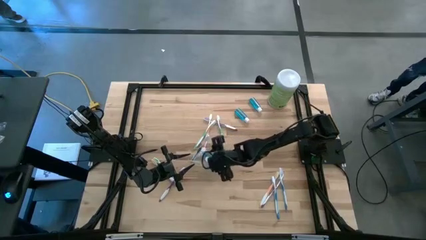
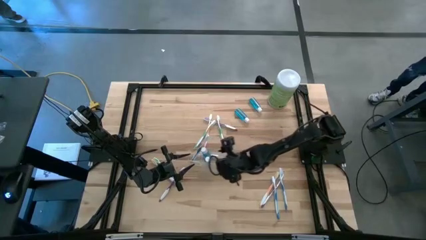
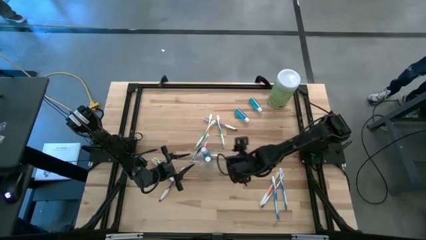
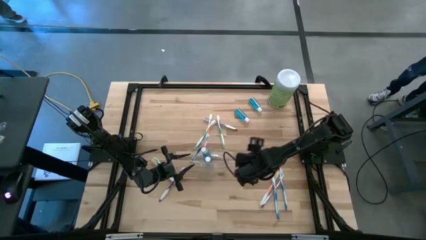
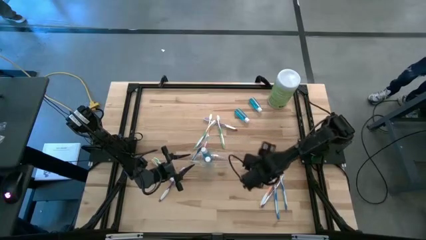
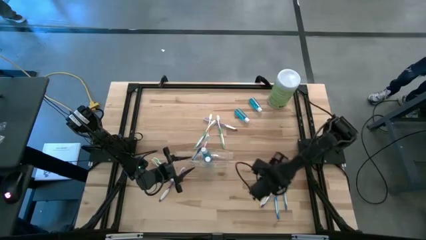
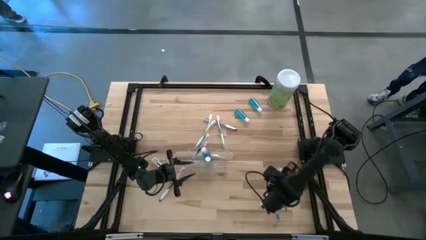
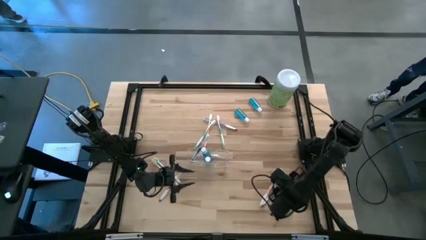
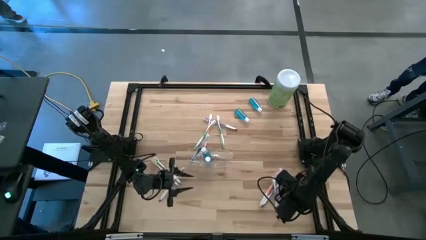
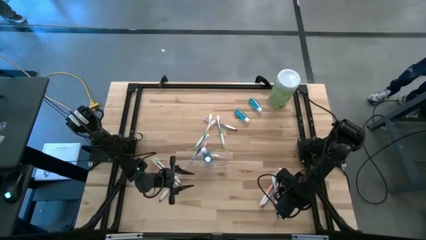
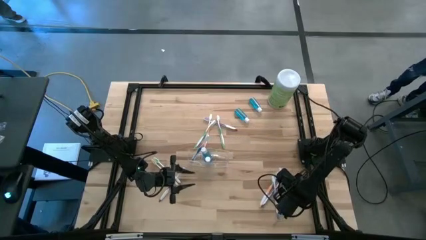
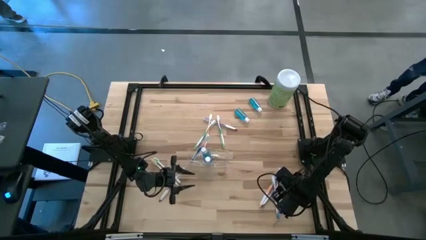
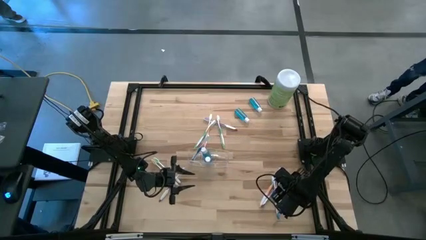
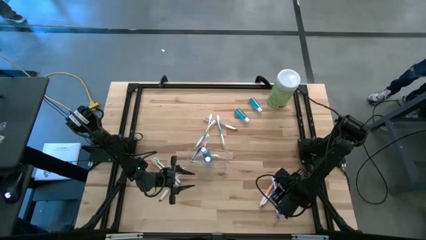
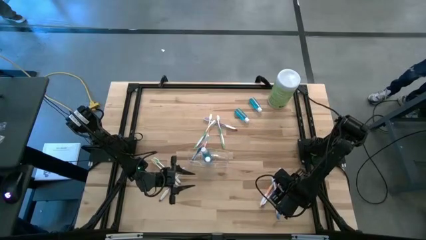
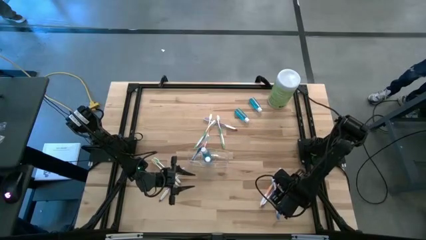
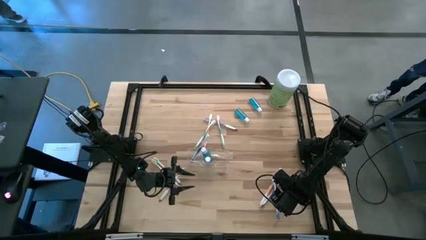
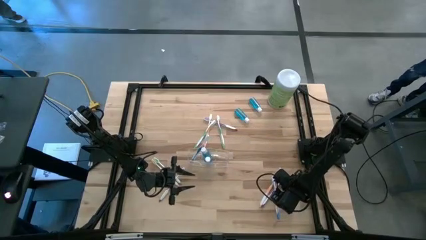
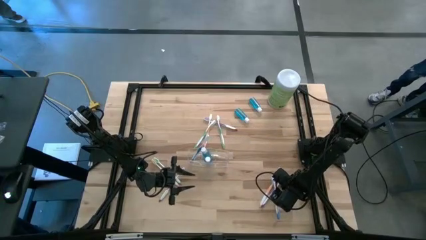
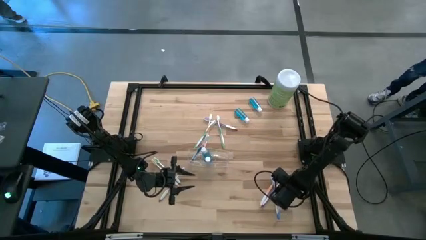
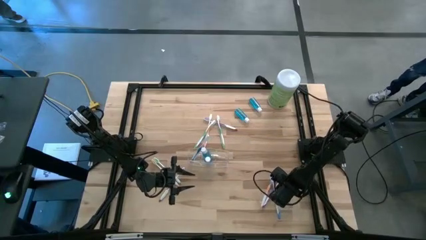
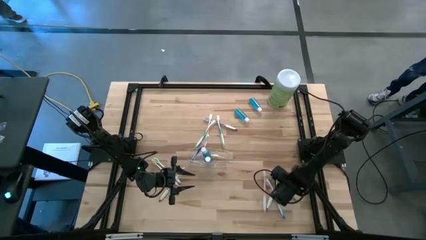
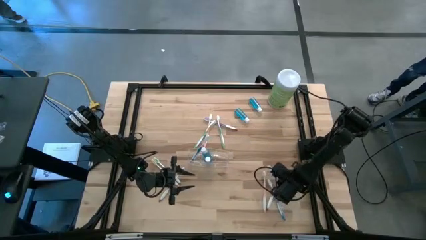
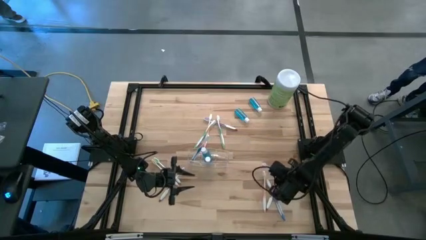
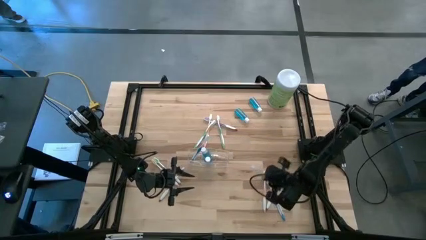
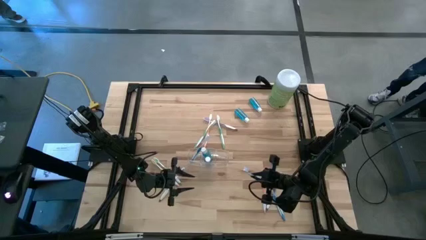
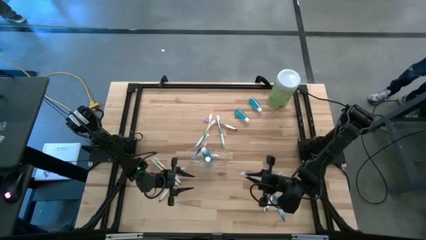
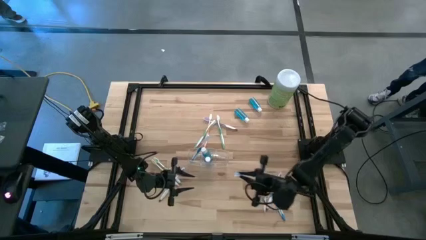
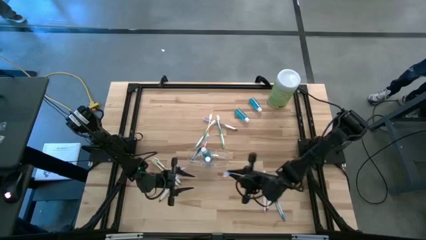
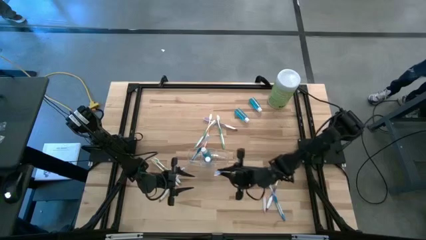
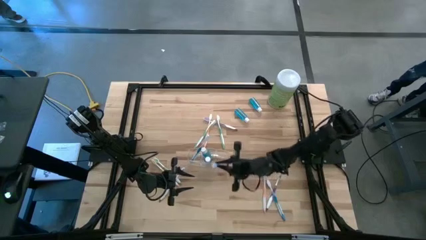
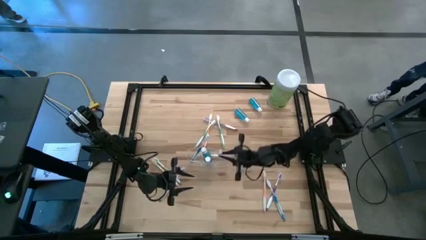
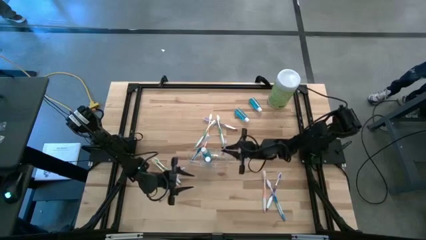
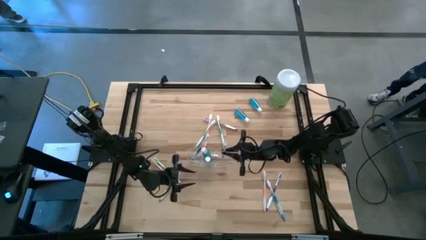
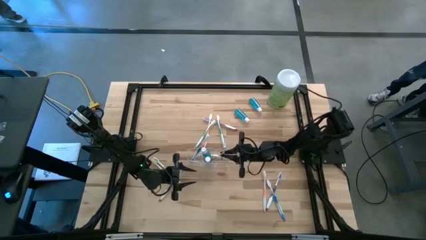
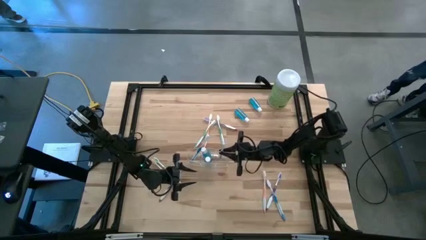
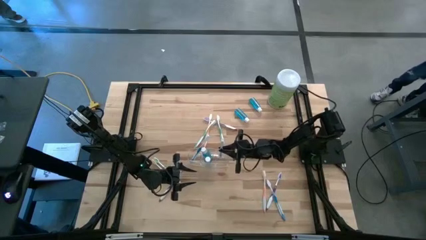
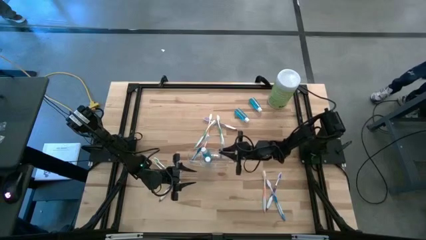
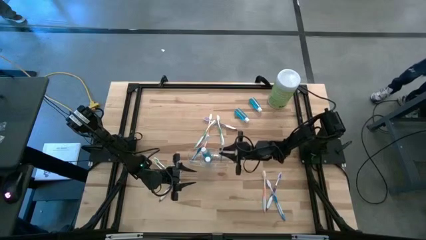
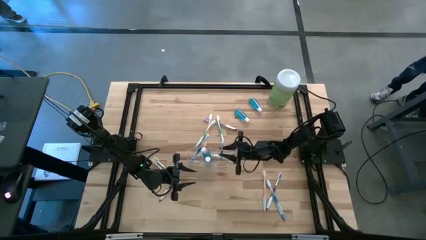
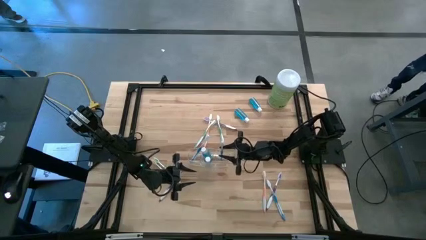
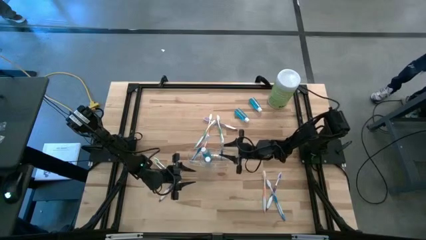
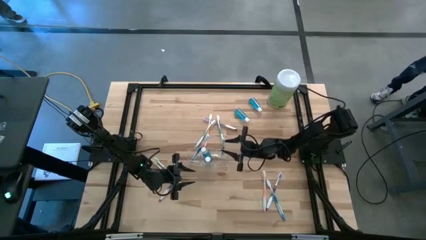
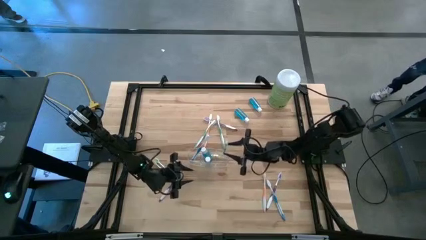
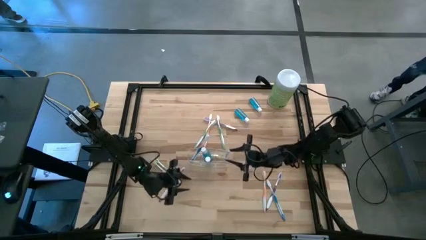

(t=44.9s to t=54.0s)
Task: Pick & Place toothbrushing station
Put the blue toothbrush into the right side of the transparent organizer

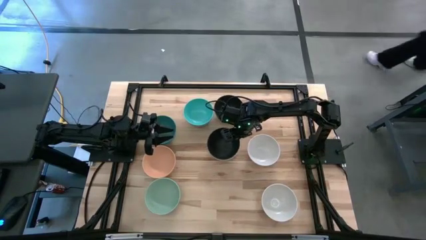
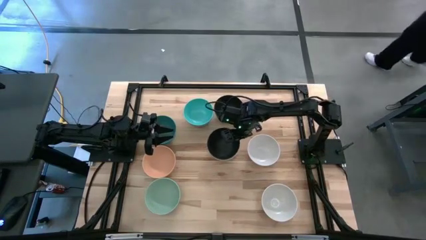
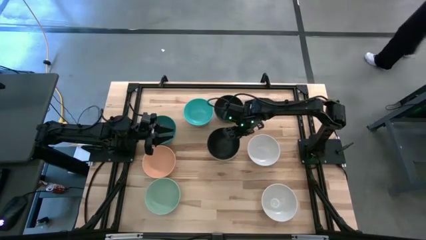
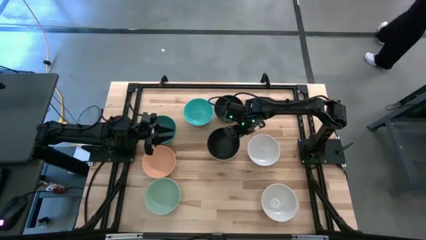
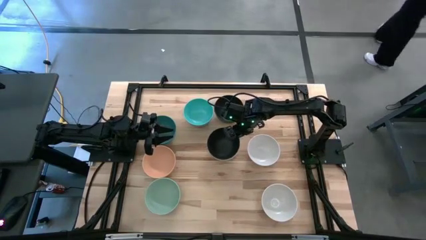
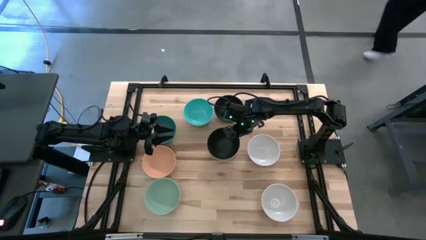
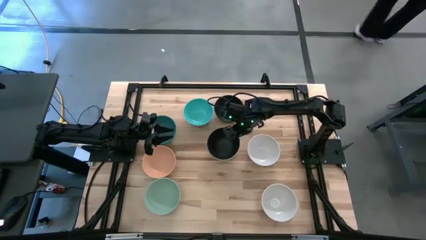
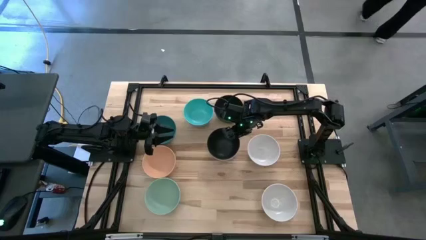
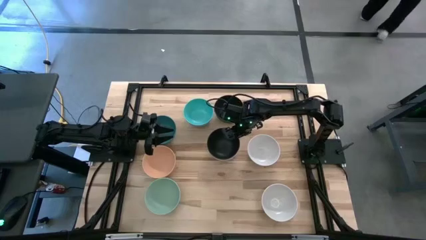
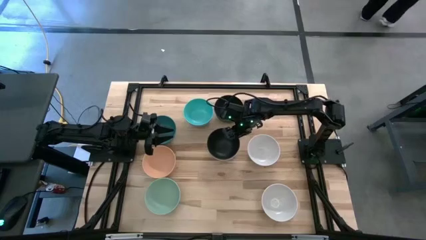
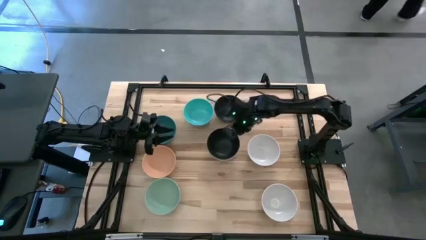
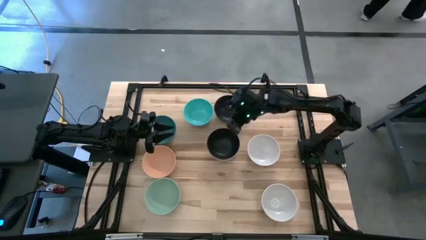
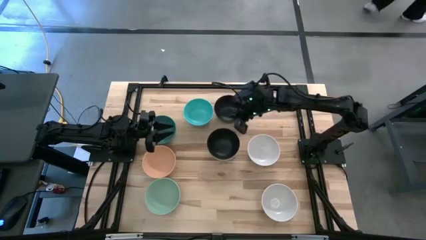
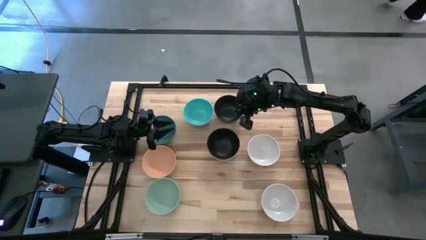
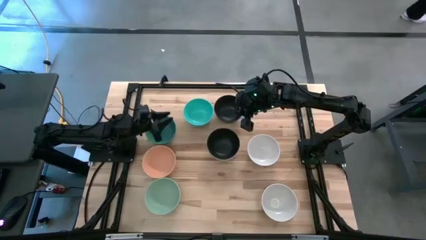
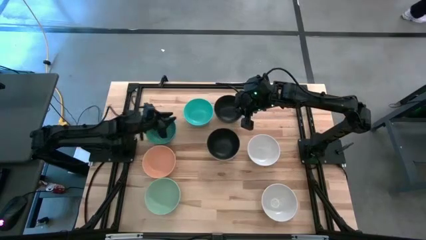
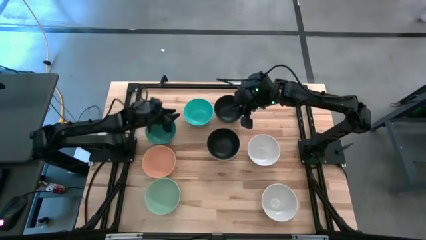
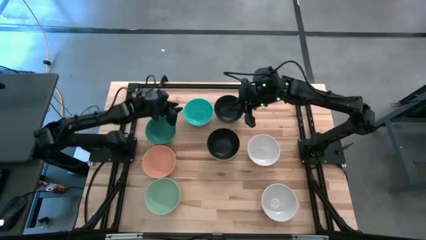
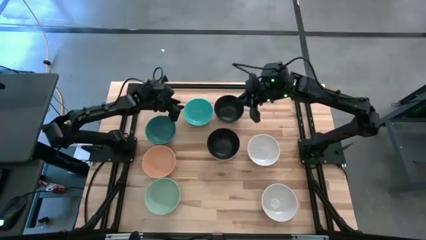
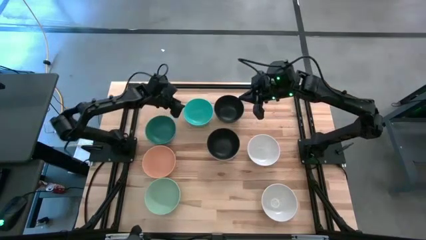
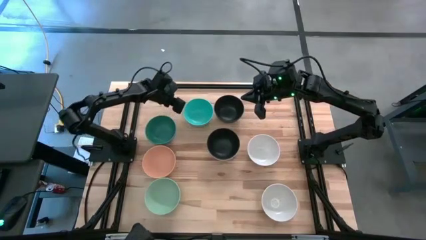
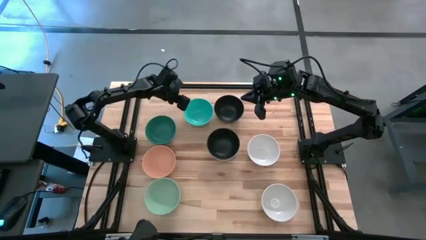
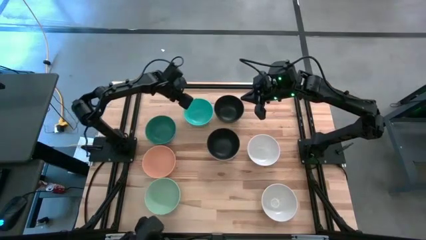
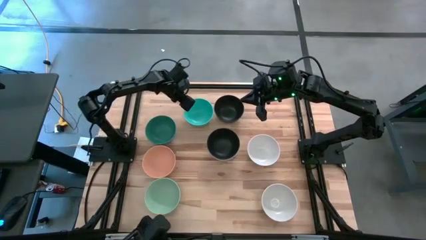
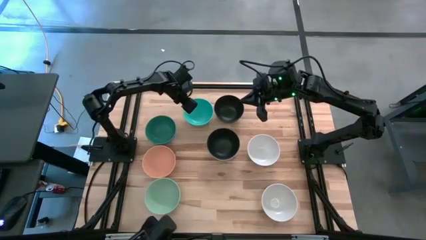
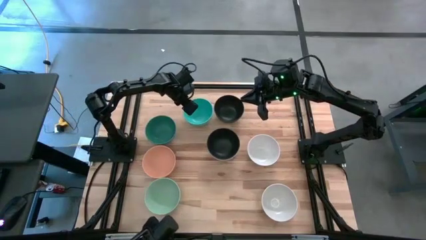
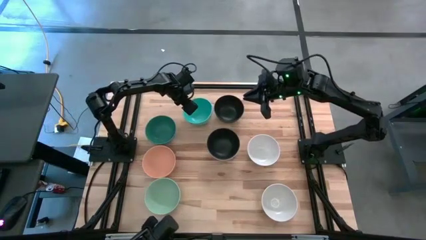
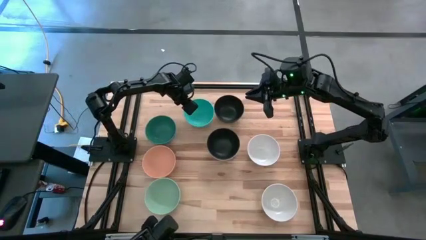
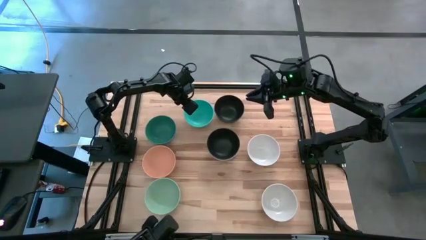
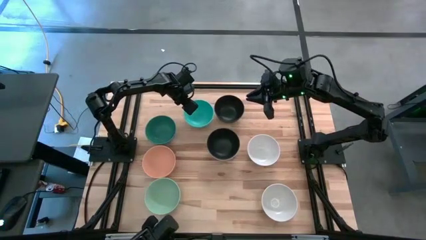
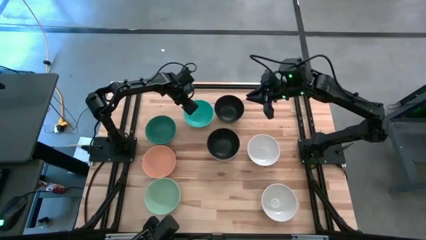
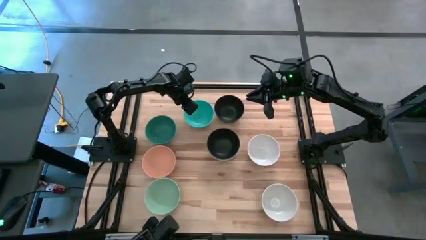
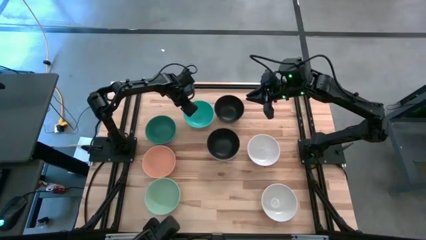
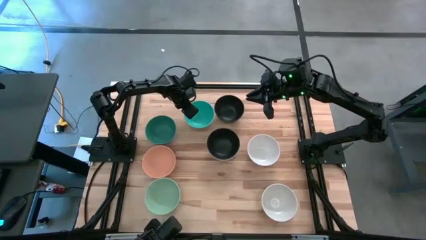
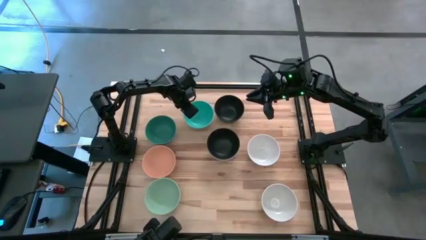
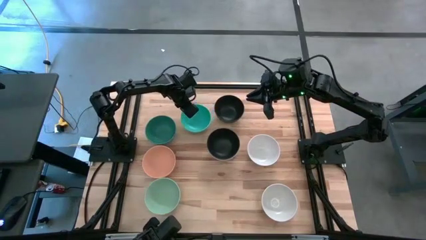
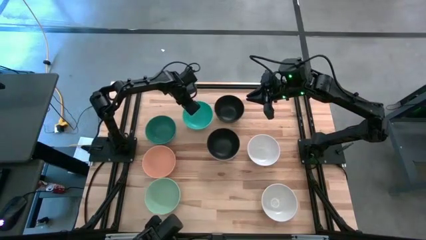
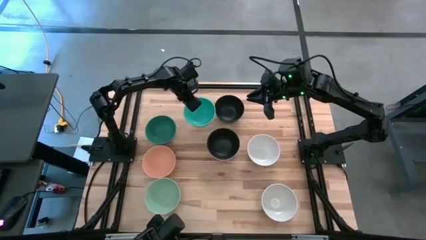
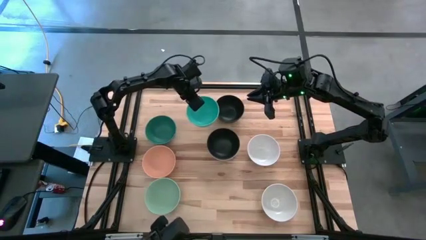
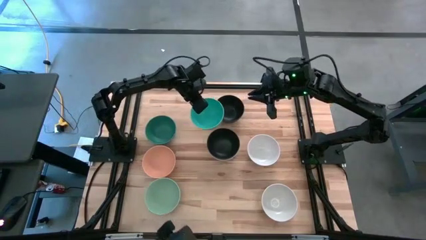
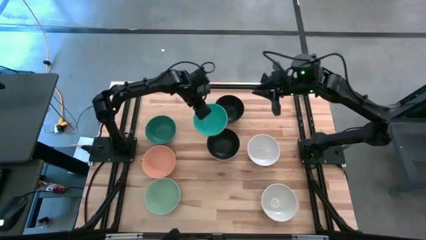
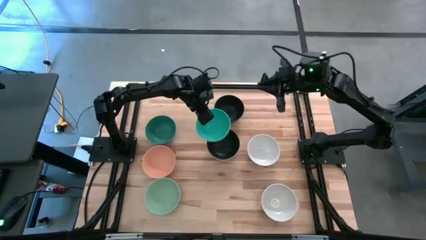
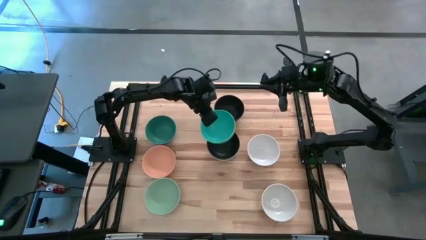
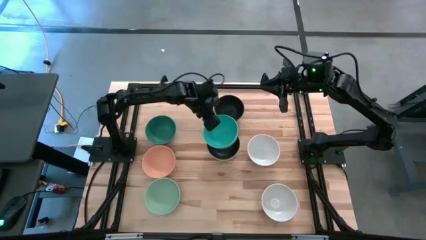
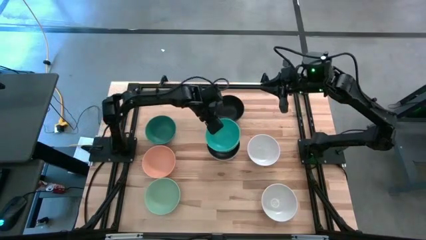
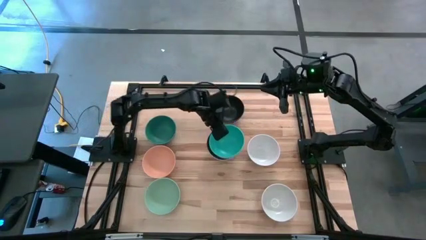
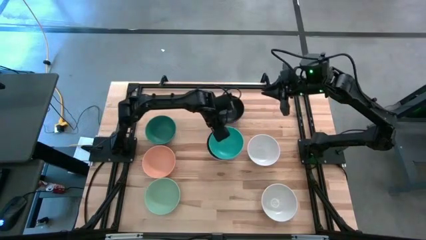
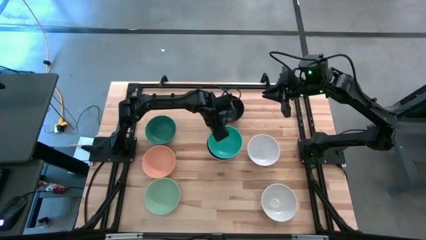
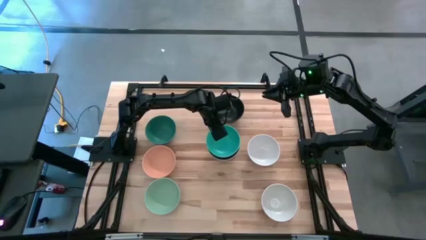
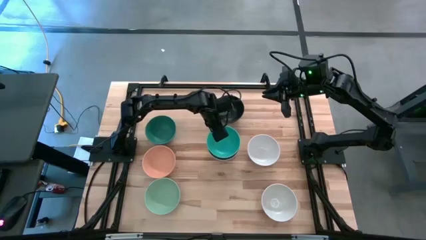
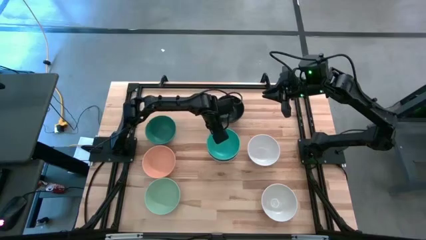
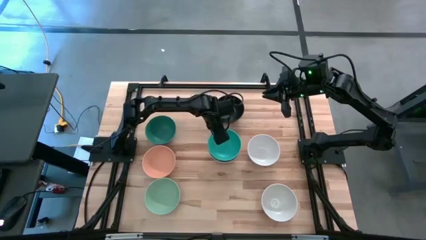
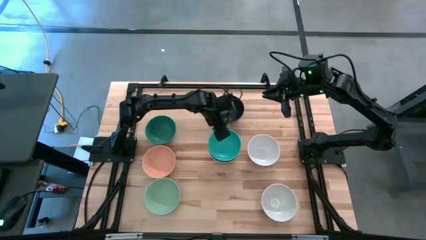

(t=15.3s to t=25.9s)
Task: Nest bowls inside each other
Stack the blue bowl on top of the black bowl
